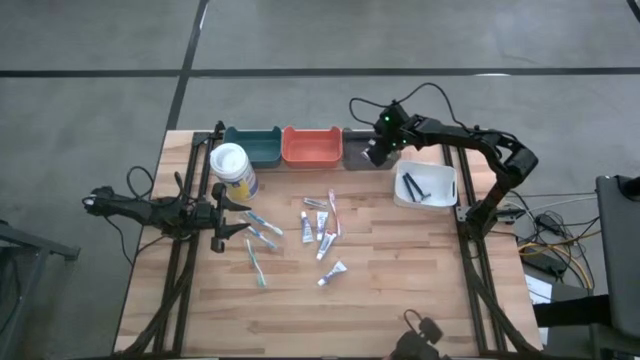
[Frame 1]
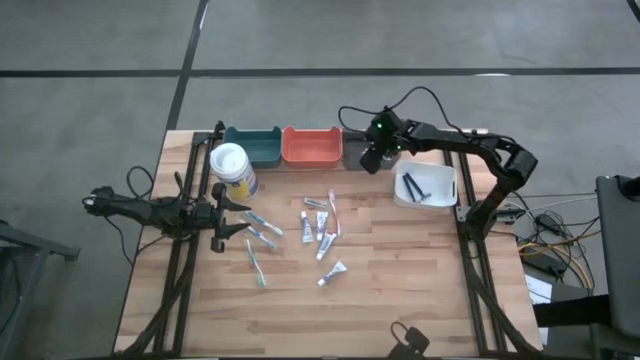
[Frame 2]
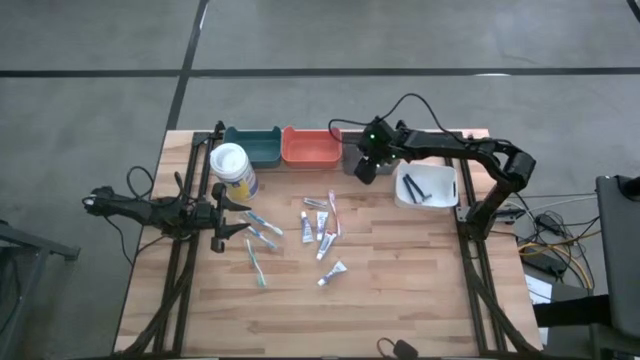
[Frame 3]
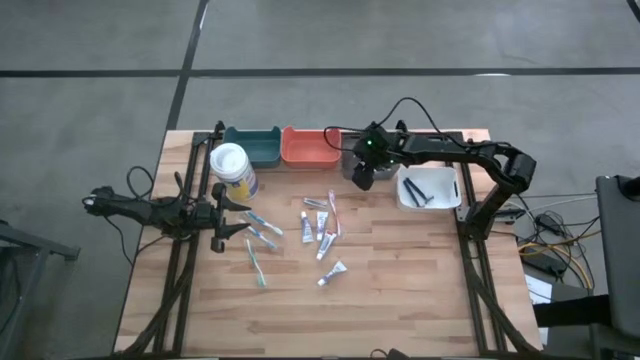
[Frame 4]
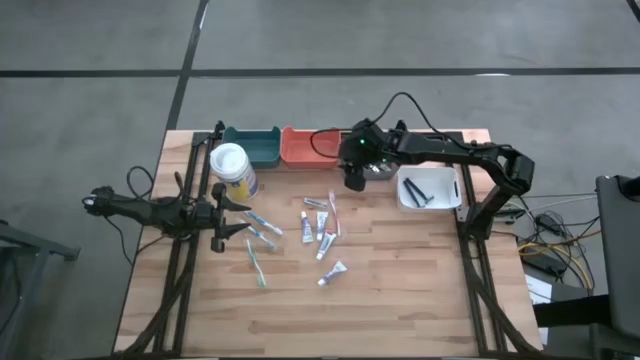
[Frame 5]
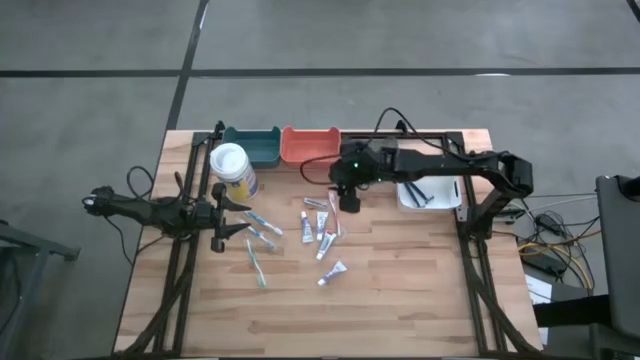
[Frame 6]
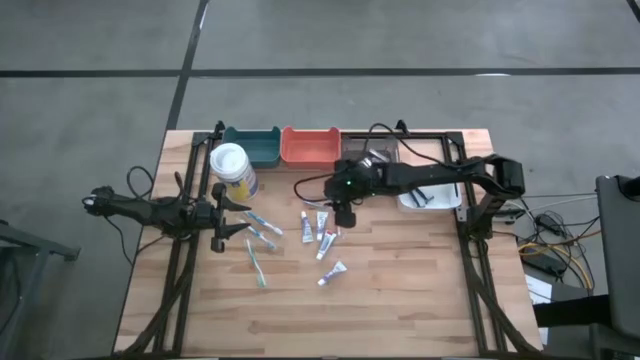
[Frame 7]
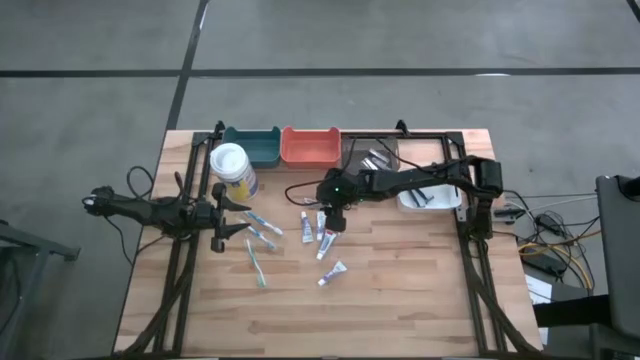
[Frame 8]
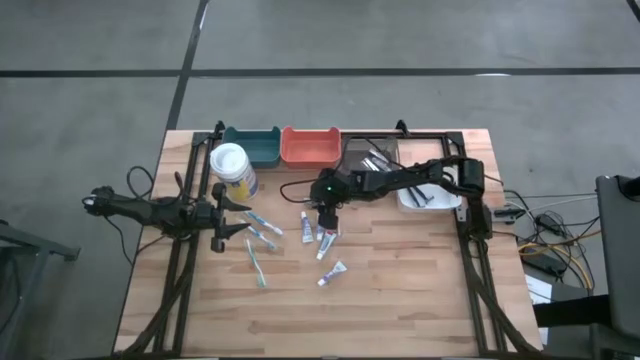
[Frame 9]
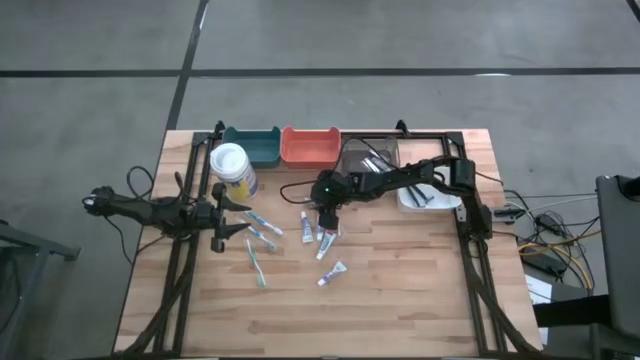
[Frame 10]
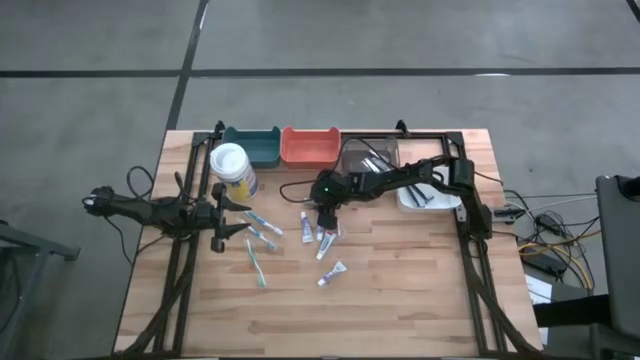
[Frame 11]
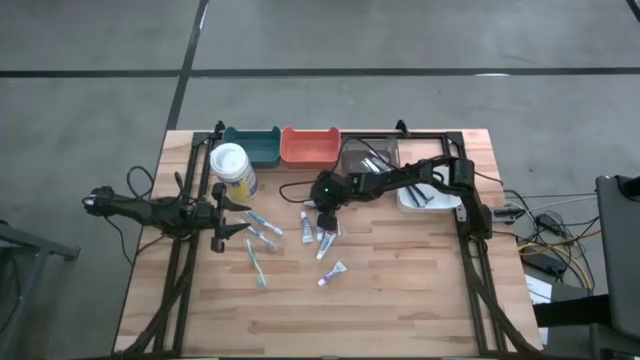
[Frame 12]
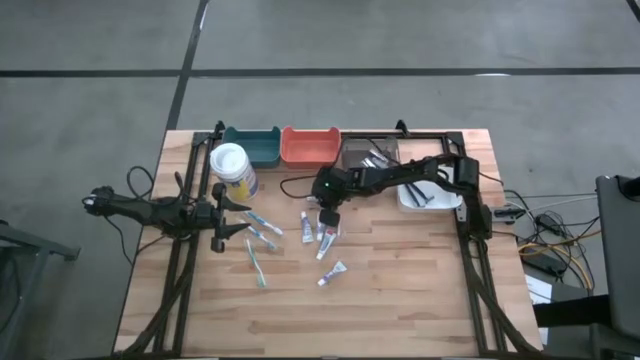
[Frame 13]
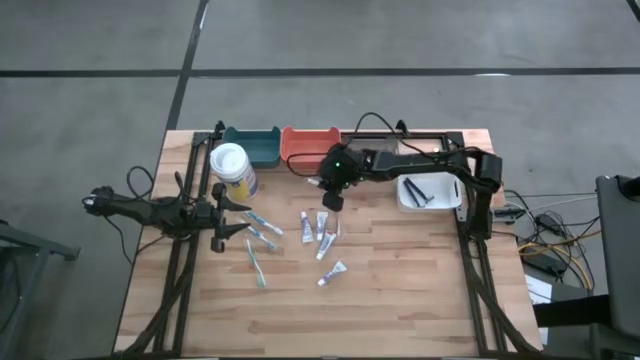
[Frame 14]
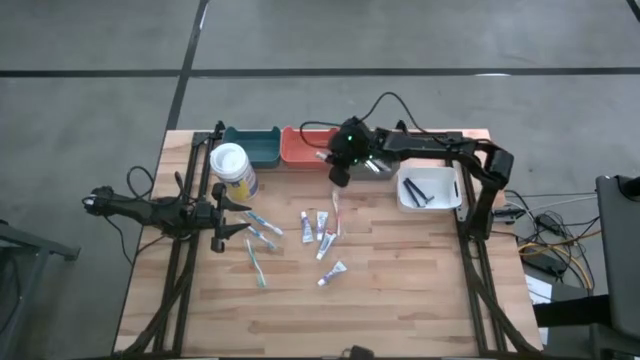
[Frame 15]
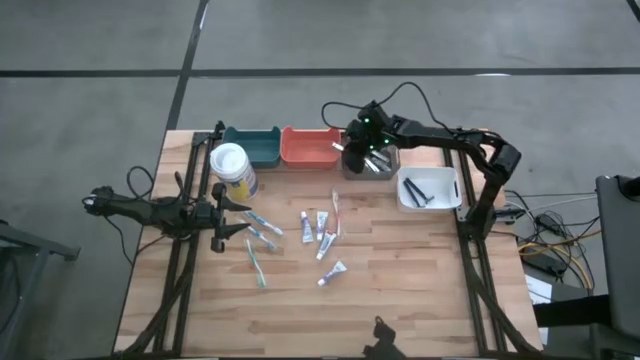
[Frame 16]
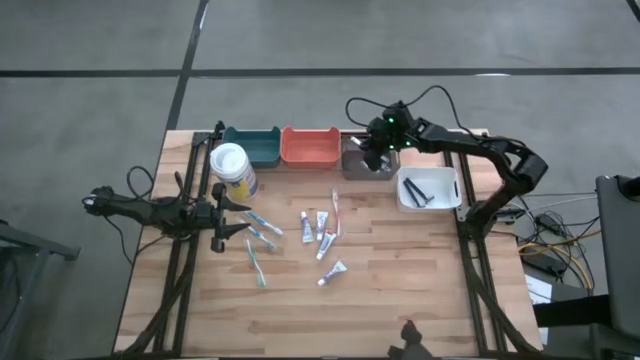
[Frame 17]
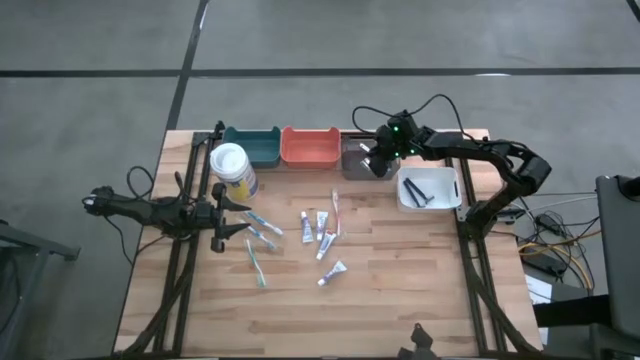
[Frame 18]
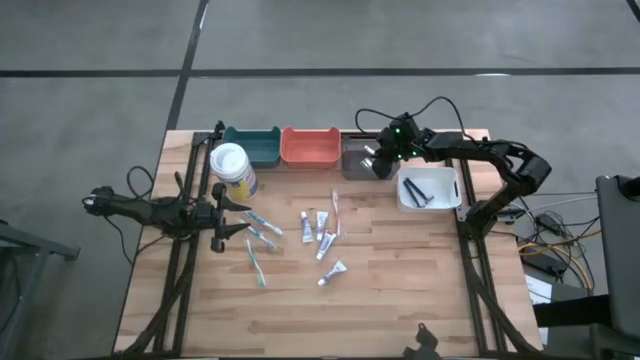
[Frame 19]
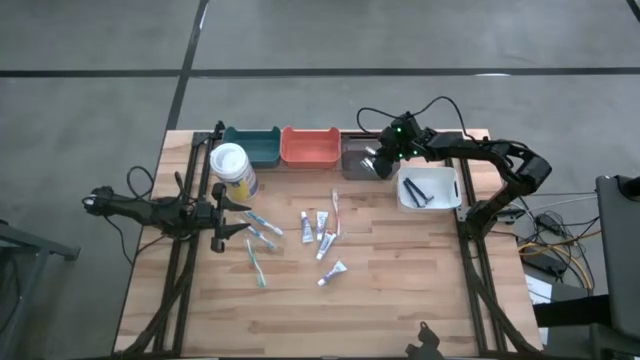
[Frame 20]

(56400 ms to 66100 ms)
Task: Pick & Place Travel size toiletries
Put the nail cutter into the black bin

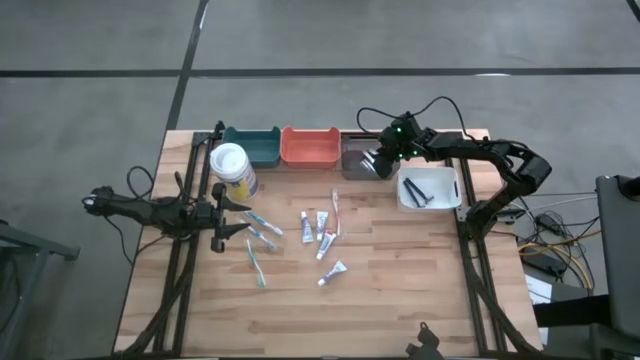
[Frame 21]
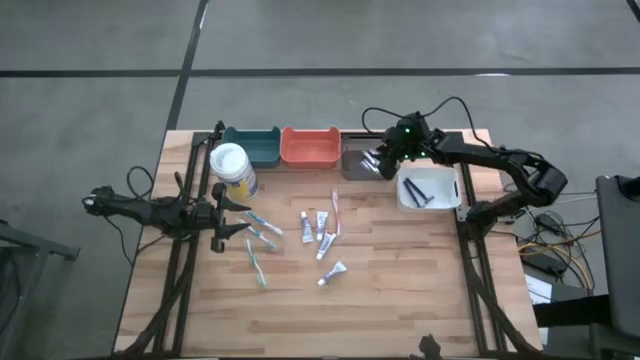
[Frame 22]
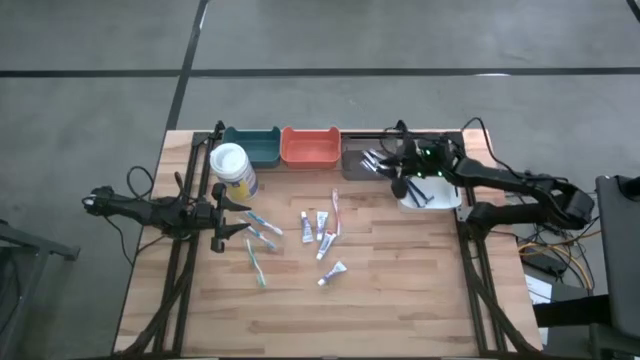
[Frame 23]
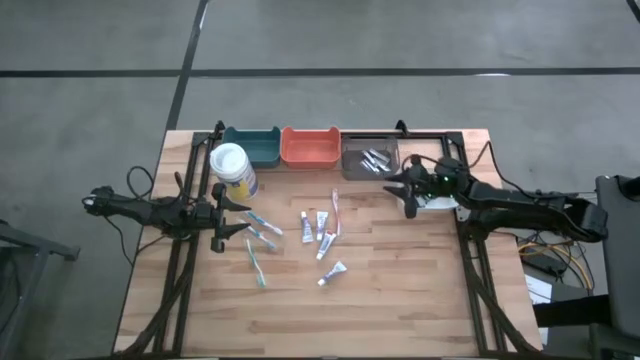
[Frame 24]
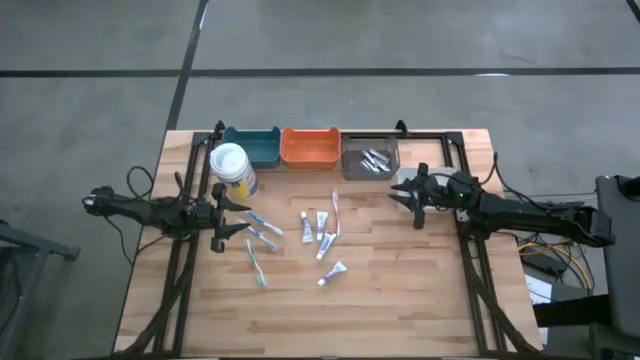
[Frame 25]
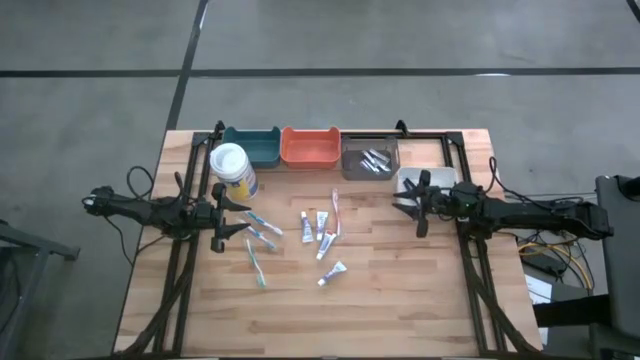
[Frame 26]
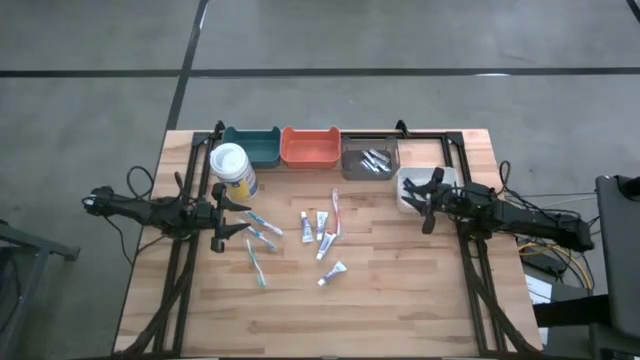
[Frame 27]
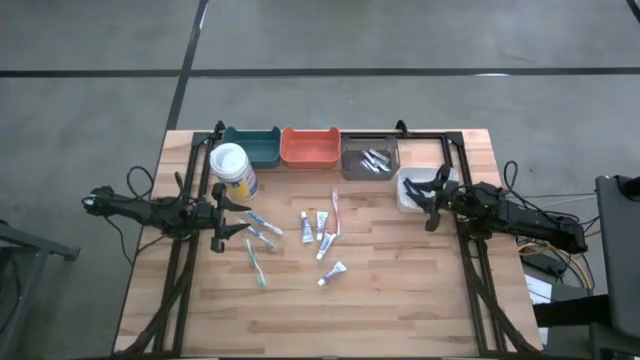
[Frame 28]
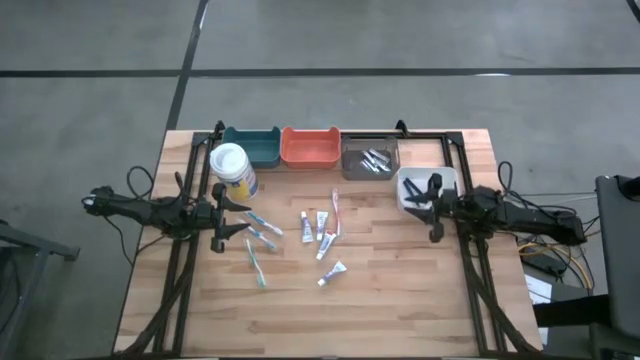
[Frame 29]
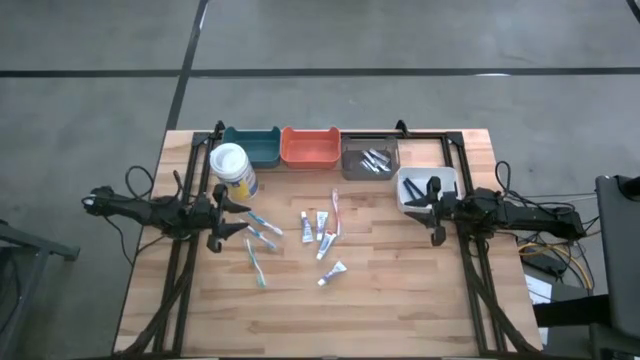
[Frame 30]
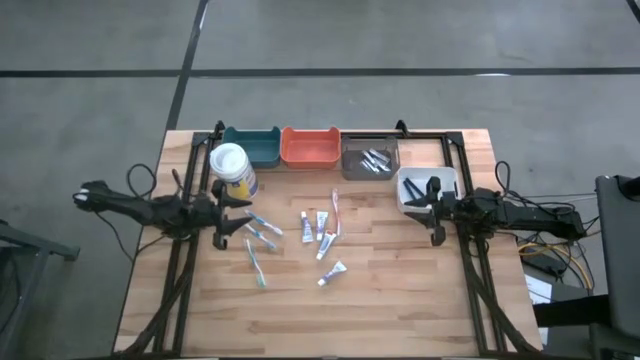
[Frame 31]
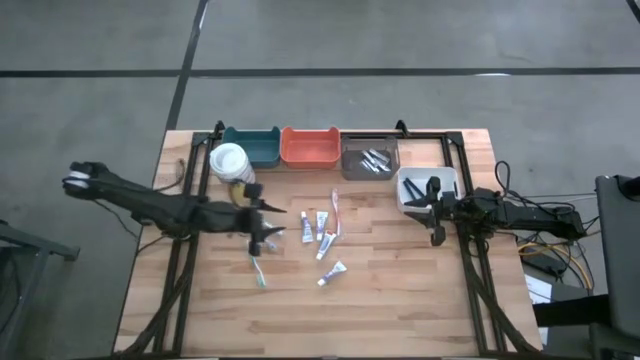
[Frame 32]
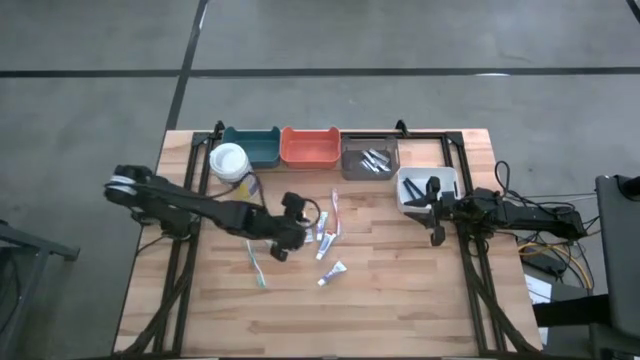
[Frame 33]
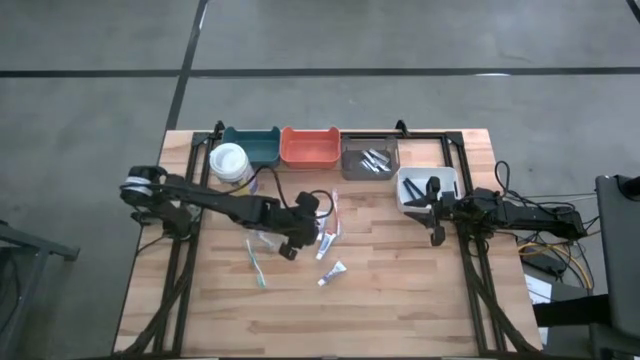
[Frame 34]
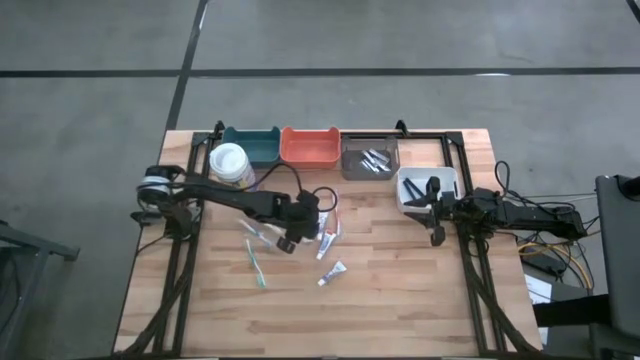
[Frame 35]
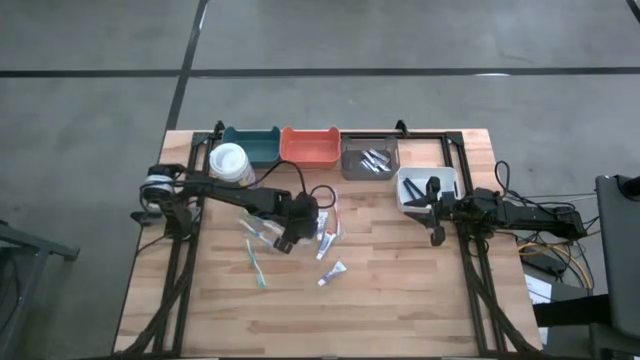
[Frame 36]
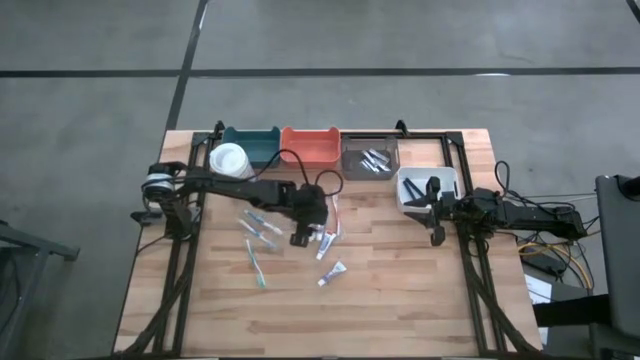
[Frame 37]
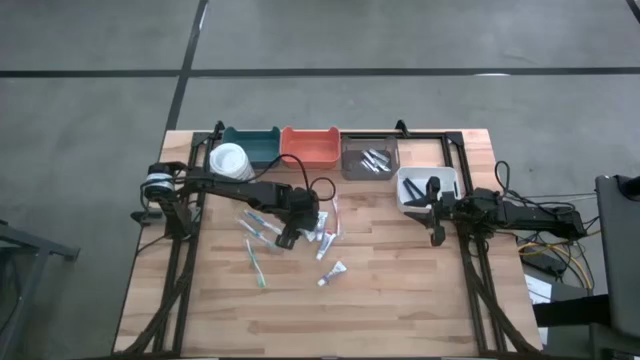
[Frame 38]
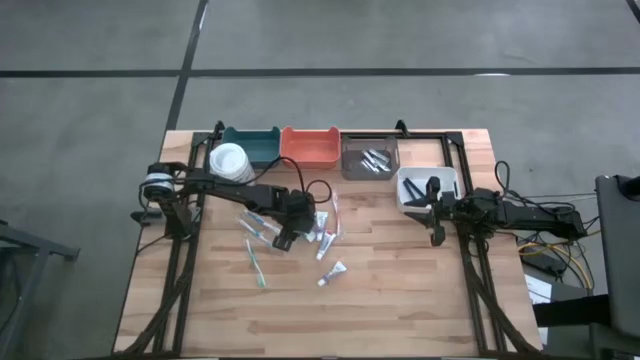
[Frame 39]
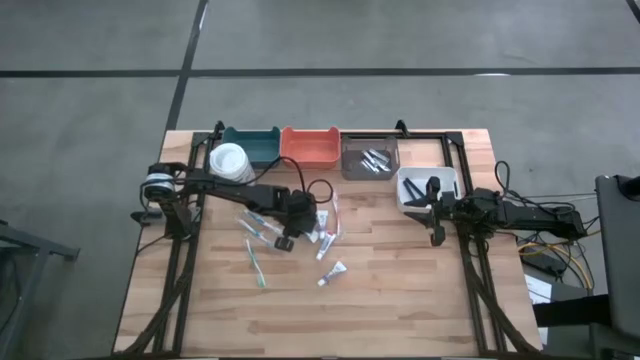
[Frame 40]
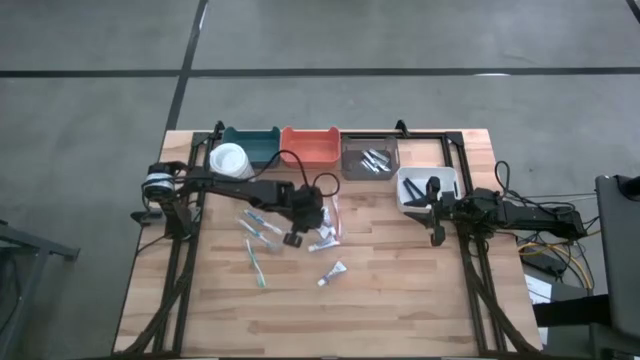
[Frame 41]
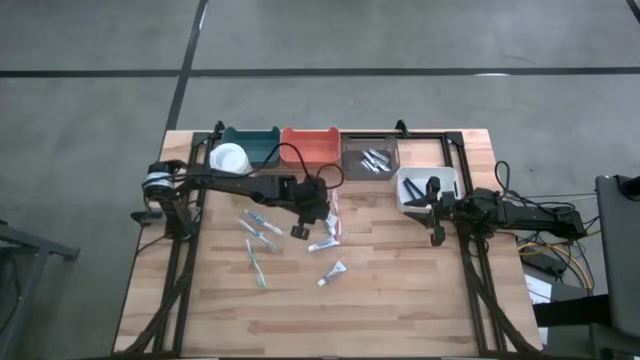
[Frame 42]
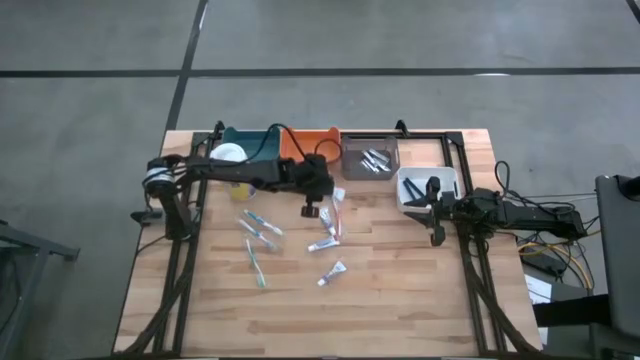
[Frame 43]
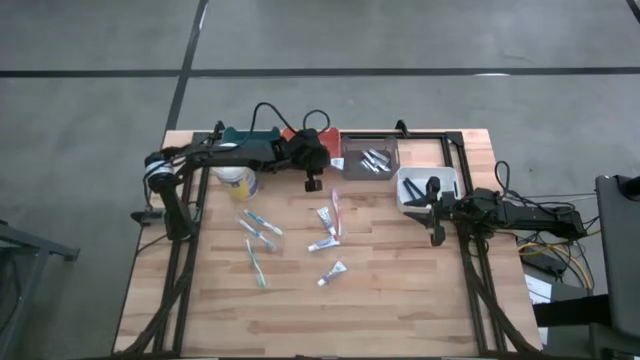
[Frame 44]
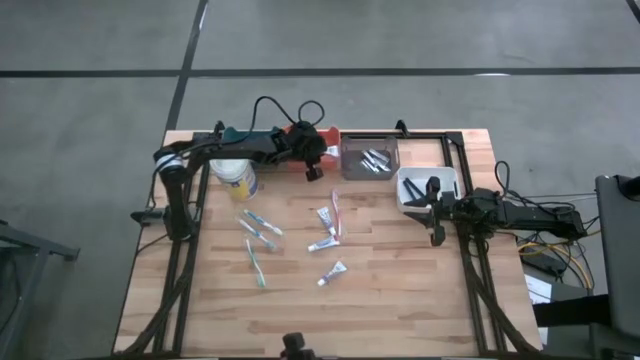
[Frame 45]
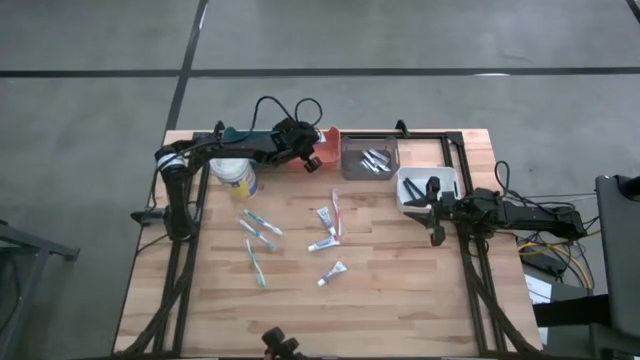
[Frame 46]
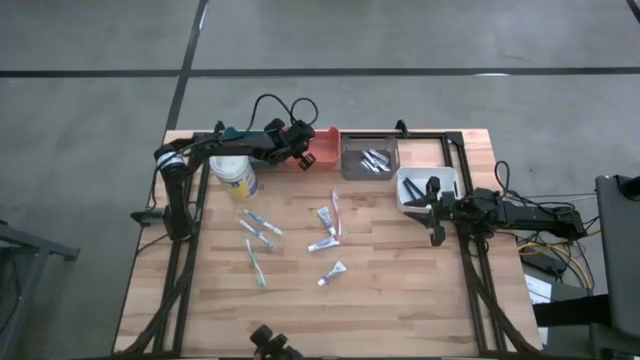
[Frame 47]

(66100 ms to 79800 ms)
Put the toothpaste into the orange bin
